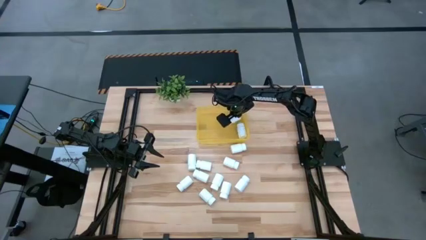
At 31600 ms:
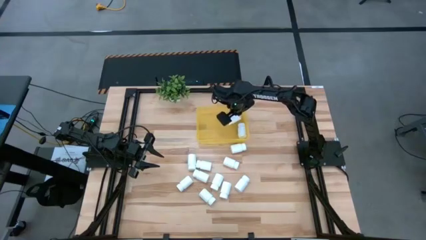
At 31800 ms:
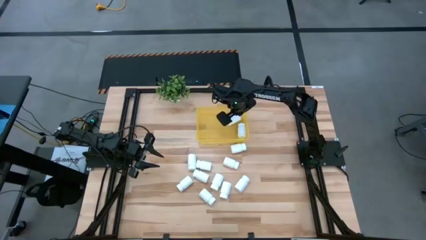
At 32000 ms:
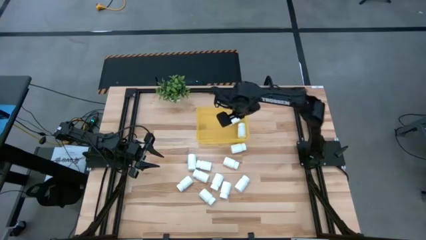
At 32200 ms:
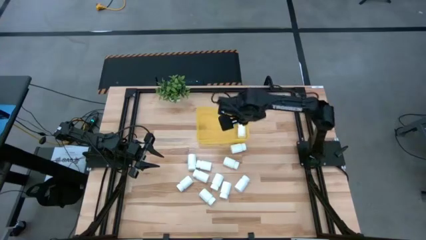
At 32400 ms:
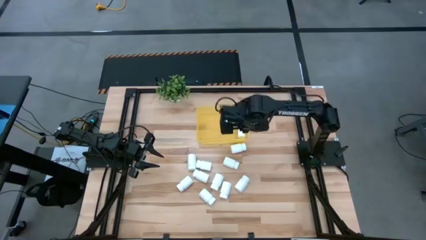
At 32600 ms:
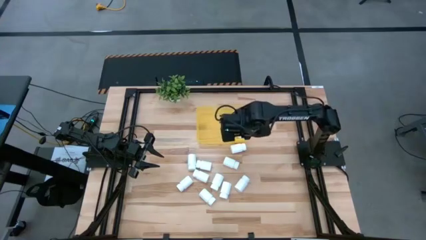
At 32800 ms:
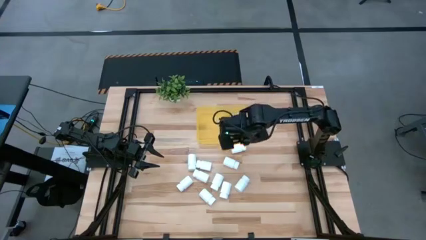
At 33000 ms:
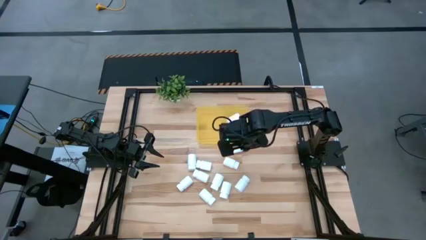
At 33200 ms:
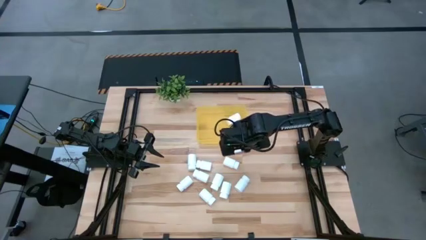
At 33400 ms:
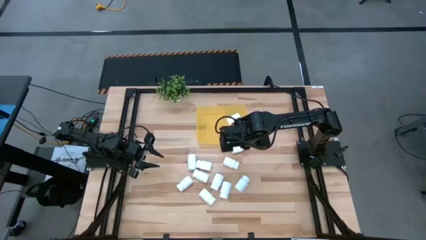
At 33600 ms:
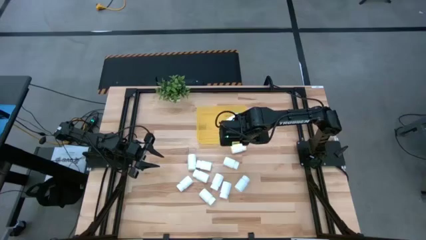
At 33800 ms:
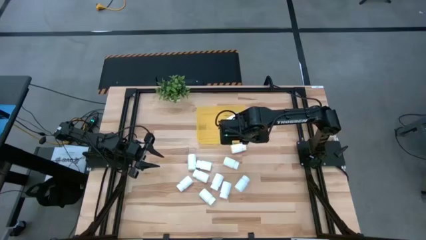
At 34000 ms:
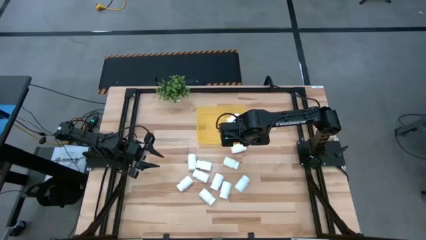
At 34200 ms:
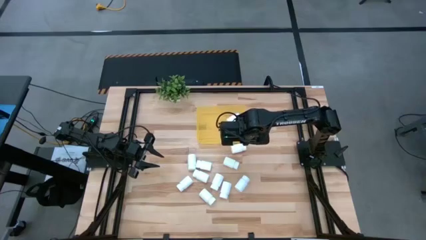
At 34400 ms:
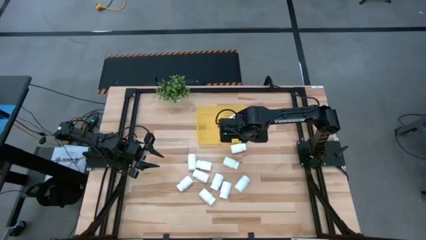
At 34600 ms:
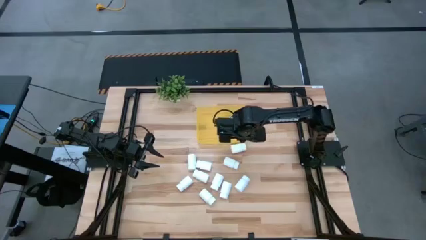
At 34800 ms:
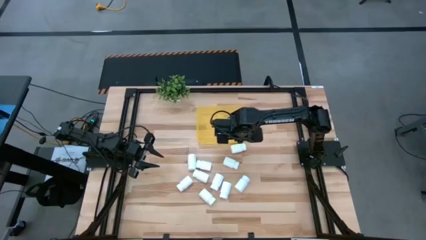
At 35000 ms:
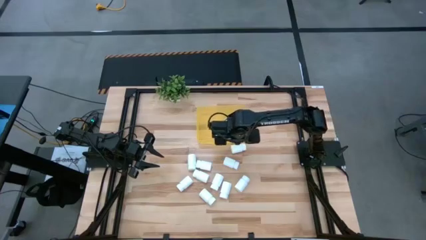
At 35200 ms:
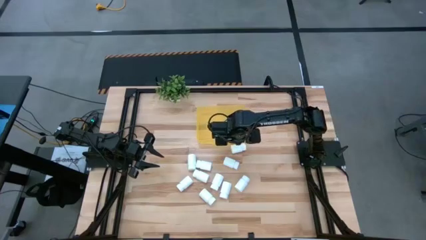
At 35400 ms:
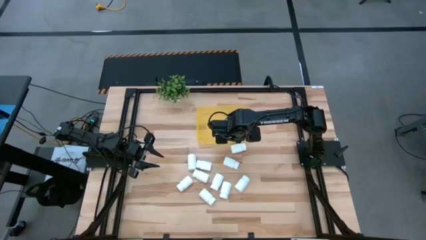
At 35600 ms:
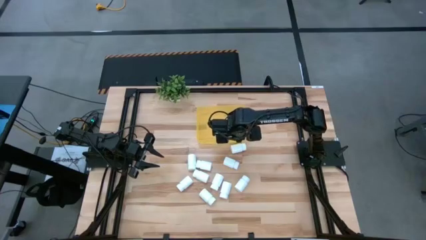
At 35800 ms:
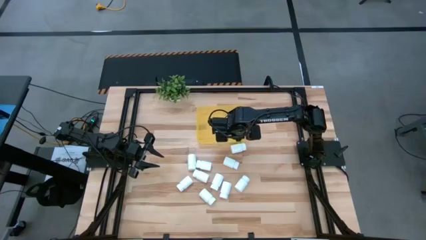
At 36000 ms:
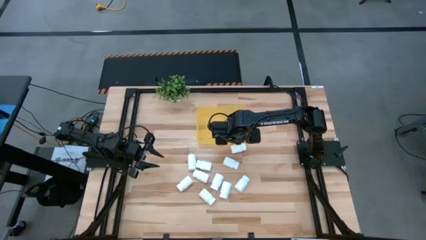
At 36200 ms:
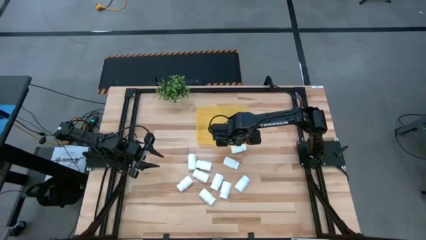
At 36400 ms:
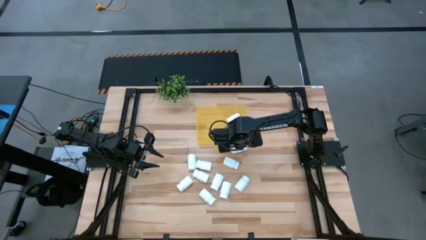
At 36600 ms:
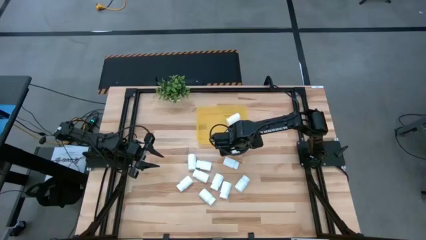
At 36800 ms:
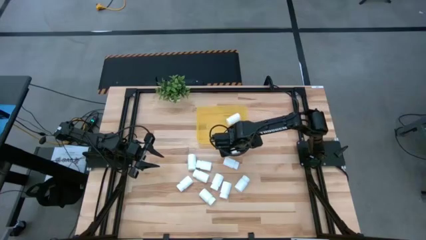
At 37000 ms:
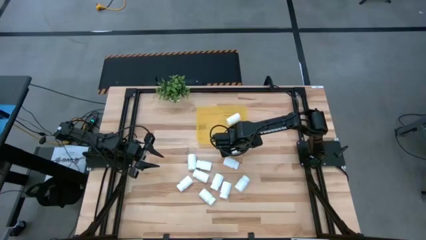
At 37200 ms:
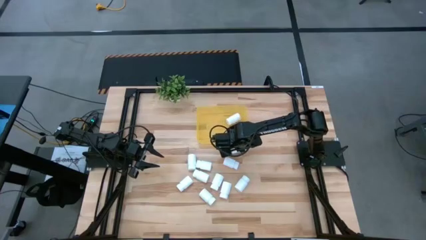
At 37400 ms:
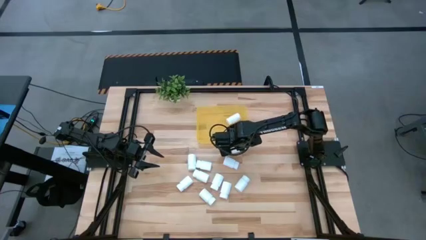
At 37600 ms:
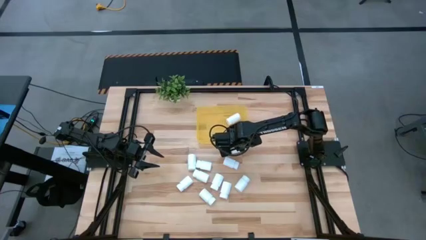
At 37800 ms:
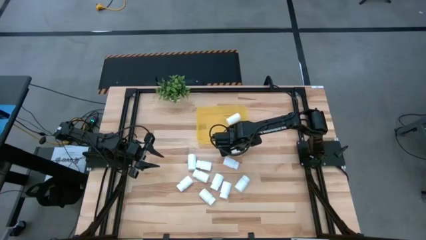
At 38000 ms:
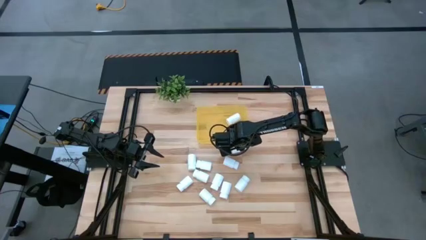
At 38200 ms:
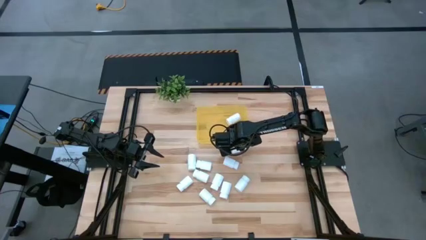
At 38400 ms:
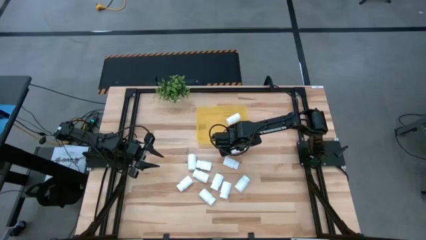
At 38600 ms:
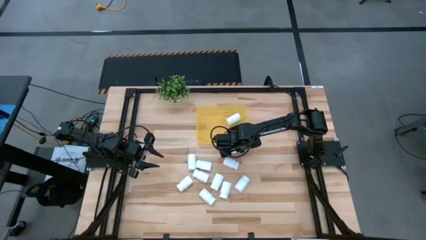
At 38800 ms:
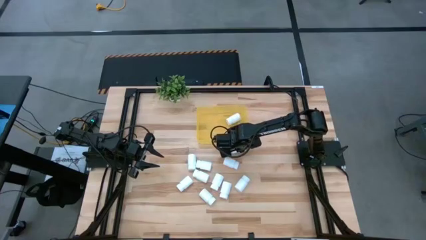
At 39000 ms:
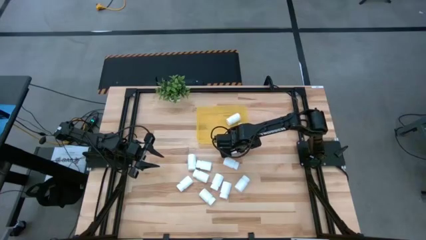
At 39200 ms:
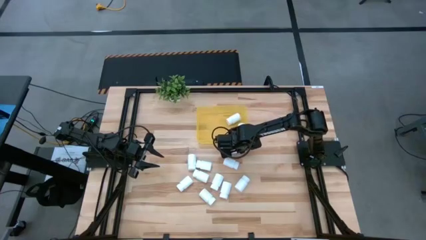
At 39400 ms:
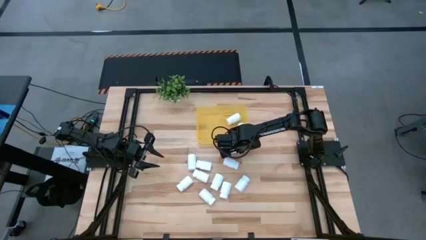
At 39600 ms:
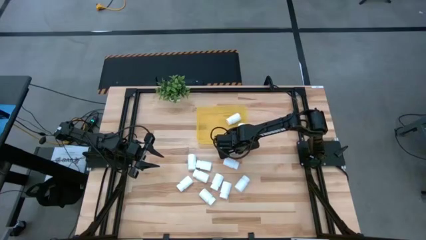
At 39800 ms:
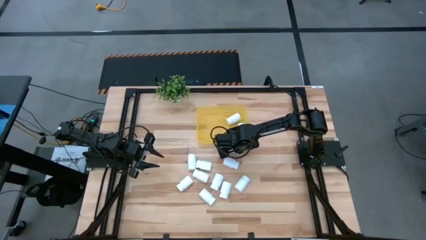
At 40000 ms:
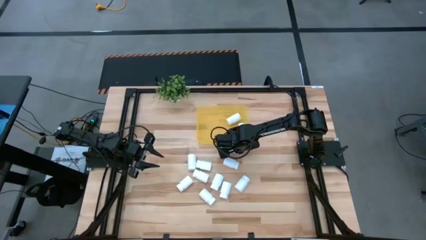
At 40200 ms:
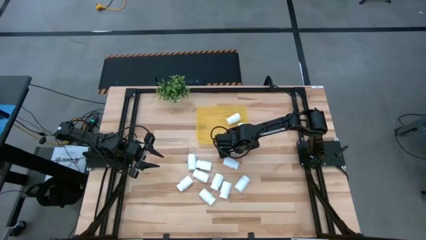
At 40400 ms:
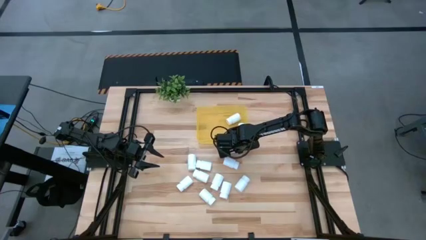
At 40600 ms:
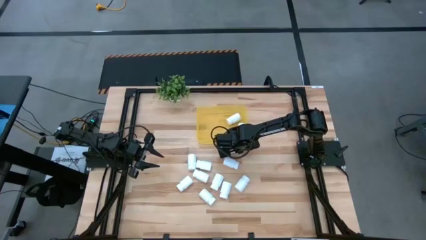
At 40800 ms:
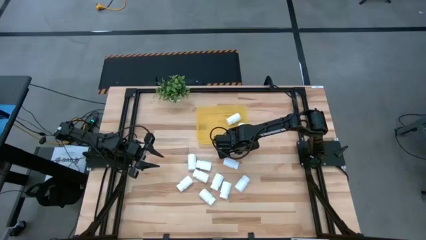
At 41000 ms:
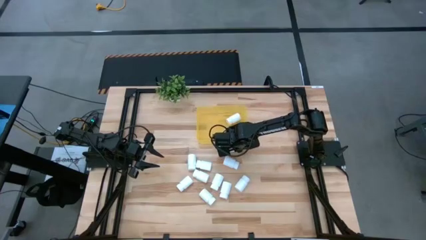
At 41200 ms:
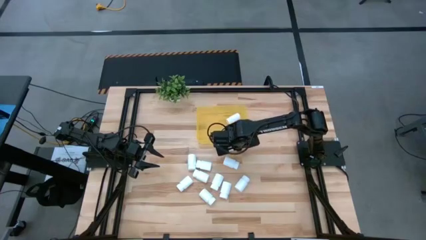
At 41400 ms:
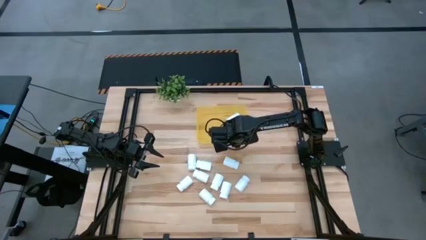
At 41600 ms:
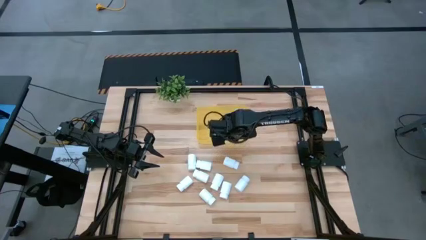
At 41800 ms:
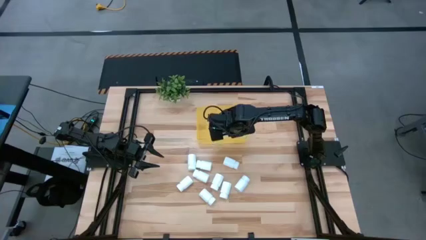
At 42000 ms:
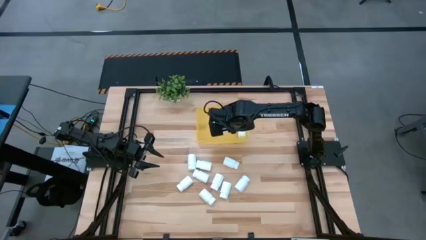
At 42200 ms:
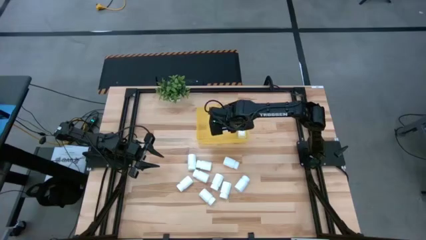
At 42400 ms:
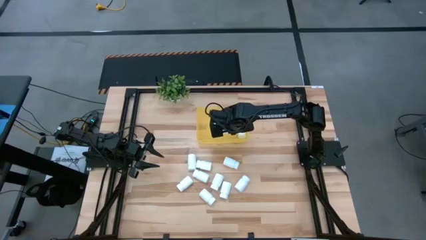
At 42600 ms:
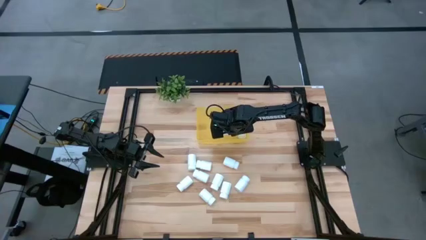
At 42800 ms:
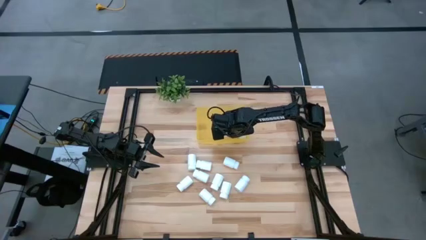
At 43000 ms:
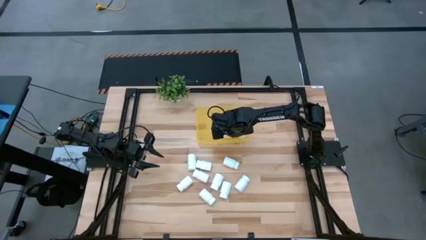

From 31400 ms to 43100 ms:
Task: Pick and place pill bottles into a basket
Put the white pill bottle into the yellow bin

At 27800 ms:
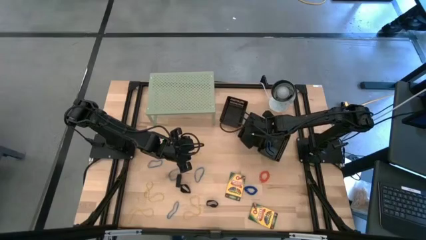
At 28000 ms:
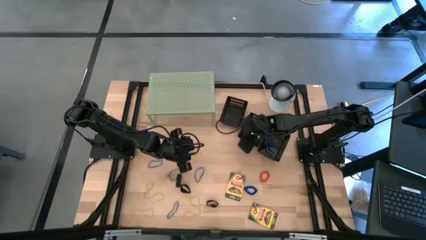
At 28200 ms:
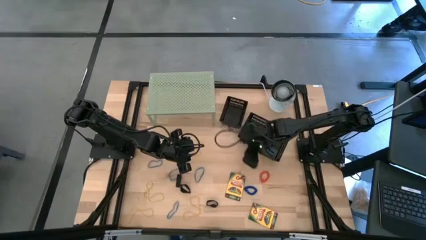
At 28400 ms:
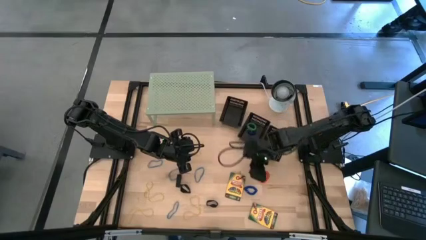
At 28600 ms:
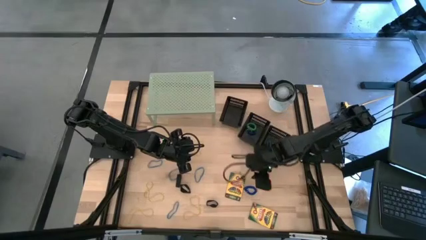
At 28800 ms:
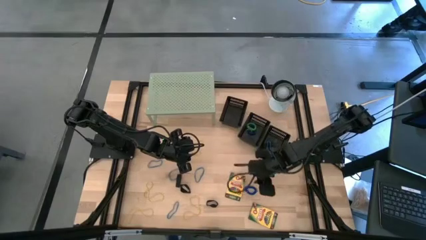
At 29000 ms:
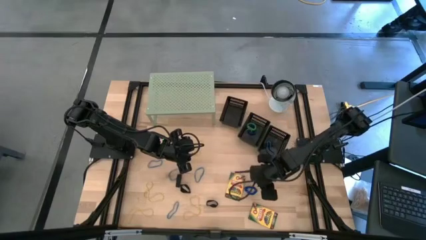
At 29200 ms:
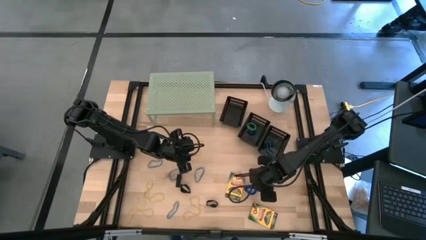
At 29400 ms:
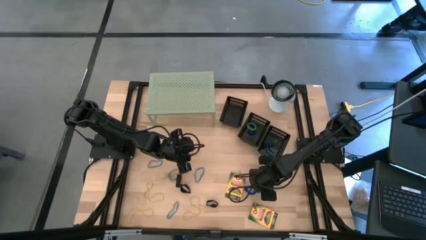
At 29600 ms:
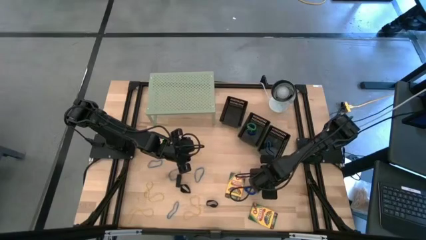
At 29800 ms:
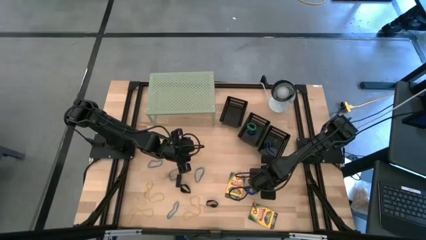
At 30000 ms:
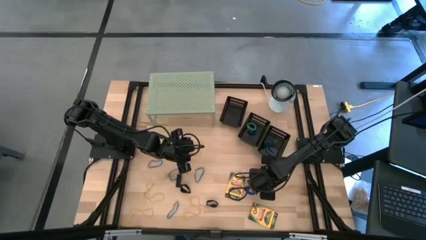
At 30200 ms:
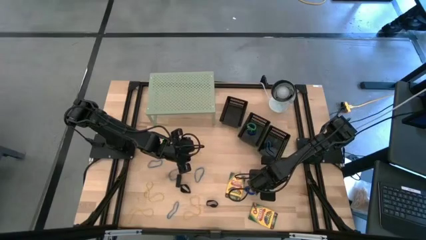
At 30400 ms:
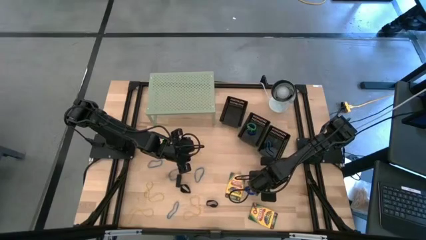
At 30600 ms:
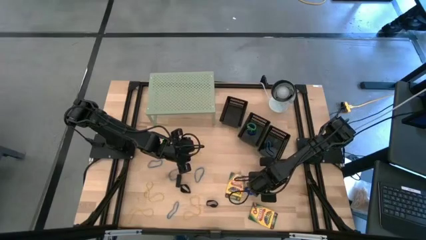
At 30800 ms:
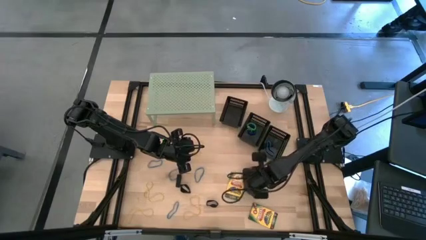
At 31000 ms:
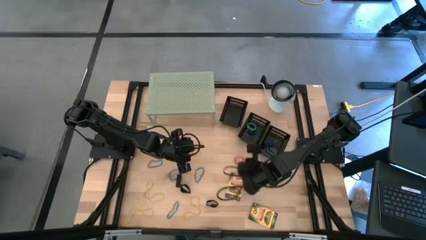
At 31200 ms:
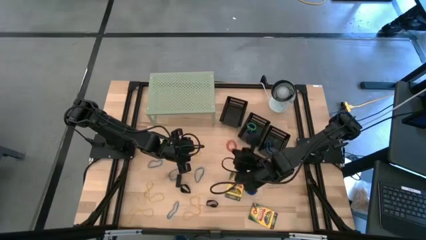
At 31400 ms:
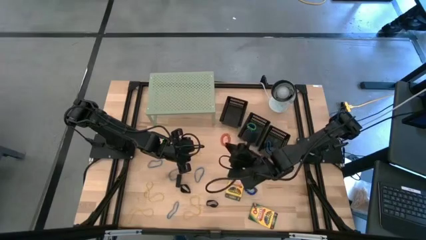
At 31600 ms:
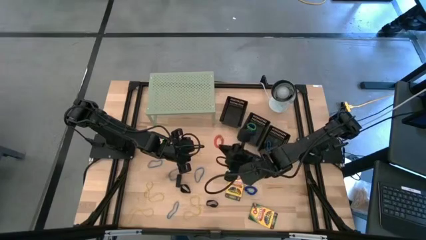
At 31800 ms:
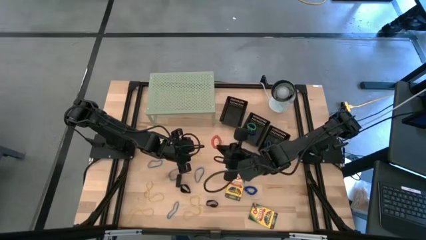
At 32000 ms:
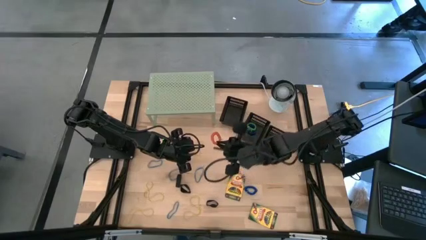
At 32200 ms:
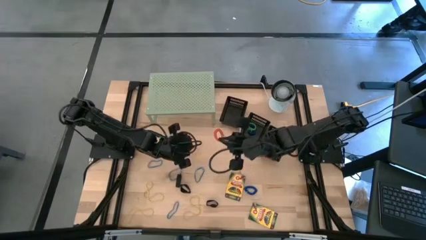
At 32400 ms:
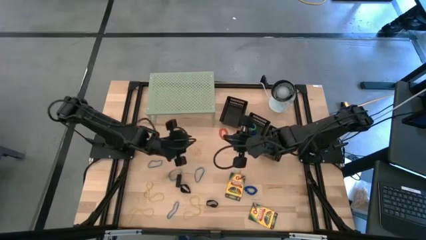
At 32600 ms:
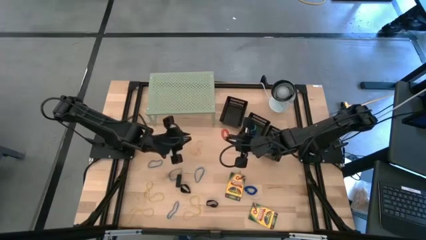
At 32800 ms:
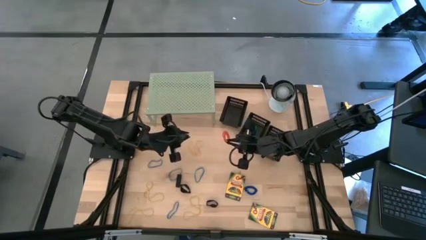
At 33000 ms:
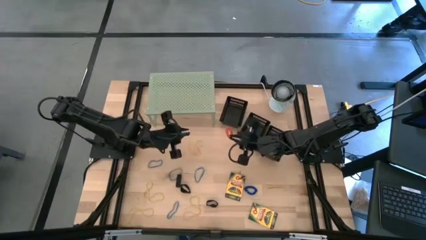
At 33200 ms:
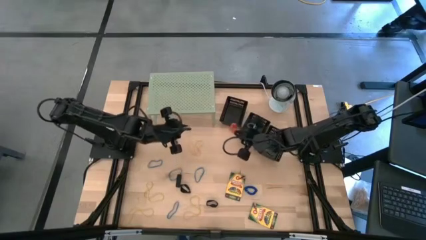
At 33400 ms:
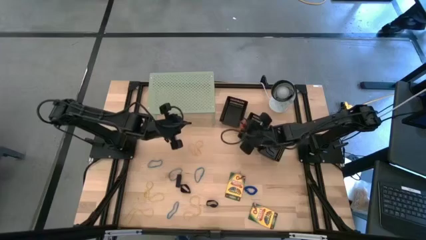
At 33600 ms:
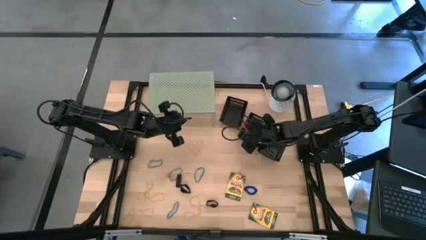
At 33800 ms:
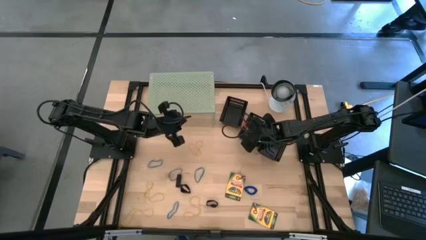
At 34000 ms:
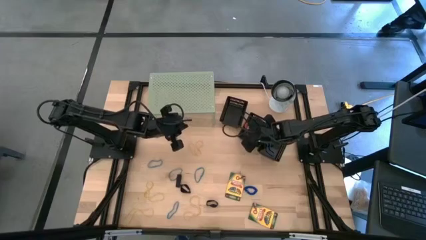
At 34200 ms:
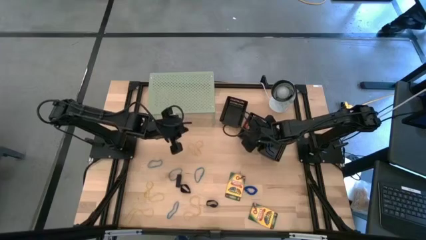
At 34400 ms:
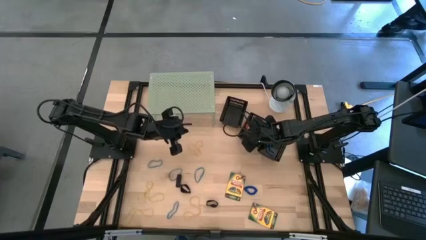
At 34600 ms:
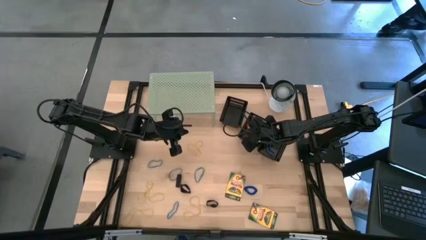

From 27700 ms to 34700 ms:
Task: Pick & Place Office Desk Supplies
Put the orange spring keychain into the middle black bin
